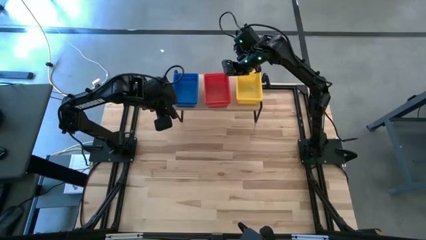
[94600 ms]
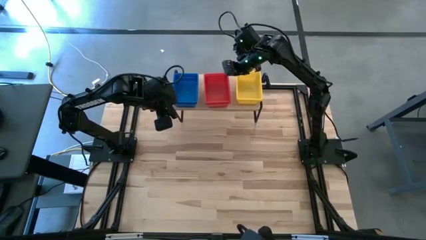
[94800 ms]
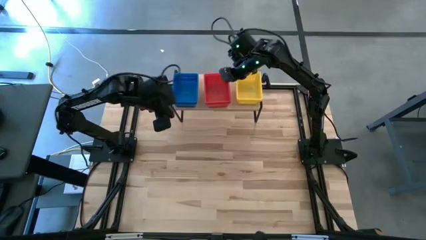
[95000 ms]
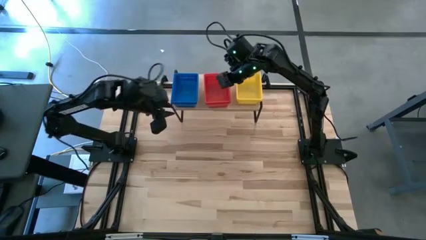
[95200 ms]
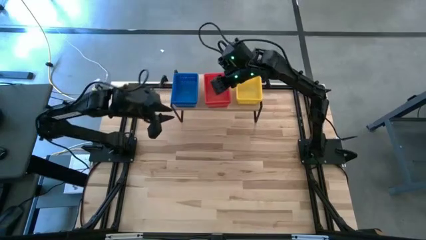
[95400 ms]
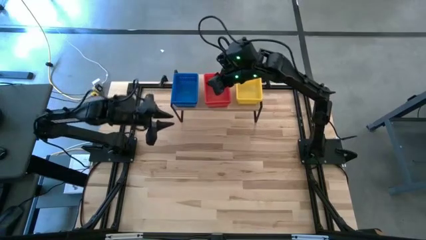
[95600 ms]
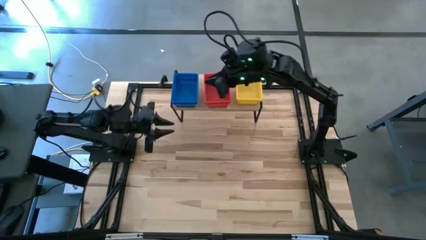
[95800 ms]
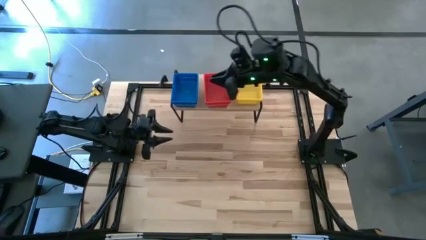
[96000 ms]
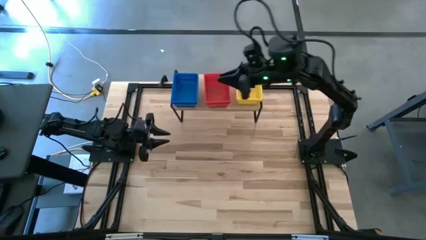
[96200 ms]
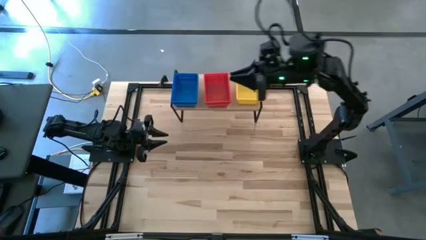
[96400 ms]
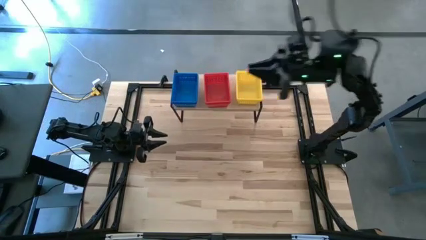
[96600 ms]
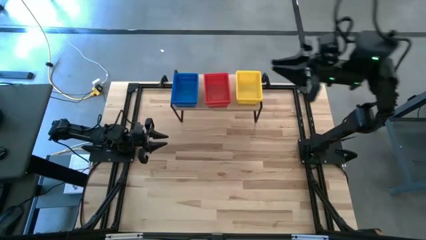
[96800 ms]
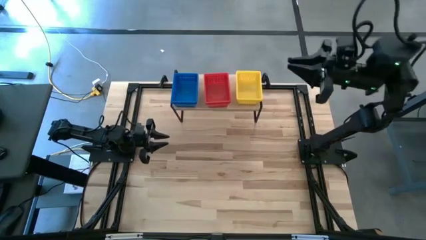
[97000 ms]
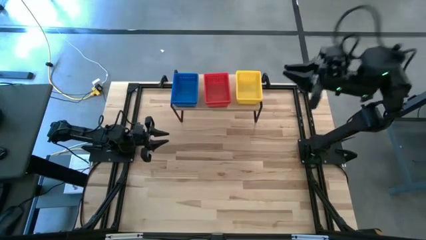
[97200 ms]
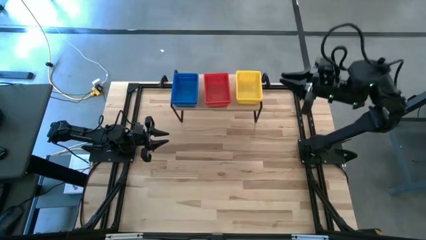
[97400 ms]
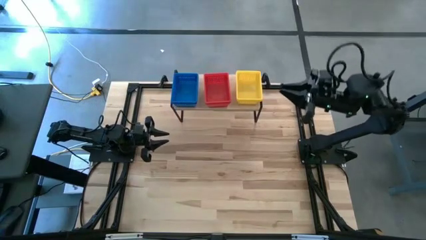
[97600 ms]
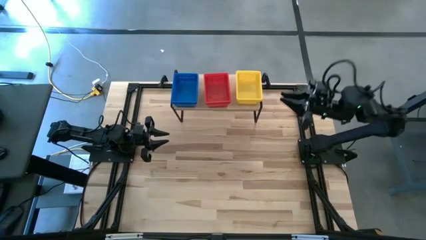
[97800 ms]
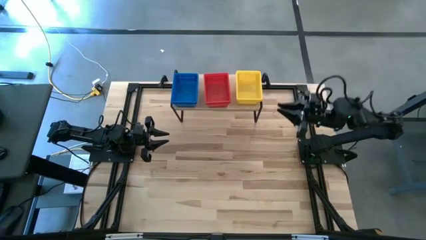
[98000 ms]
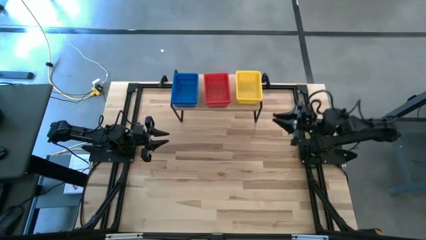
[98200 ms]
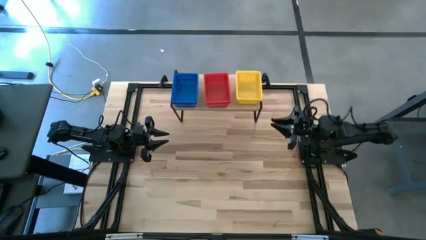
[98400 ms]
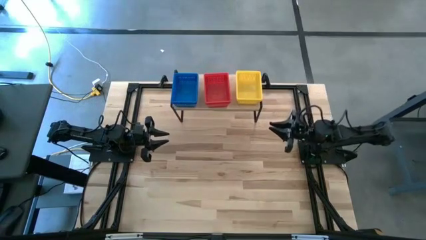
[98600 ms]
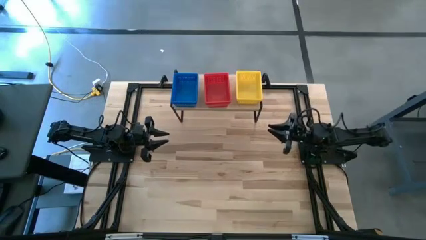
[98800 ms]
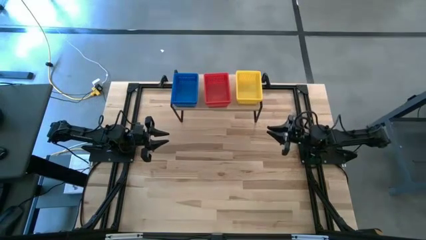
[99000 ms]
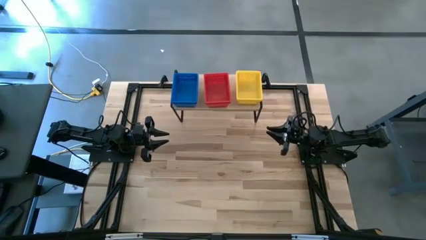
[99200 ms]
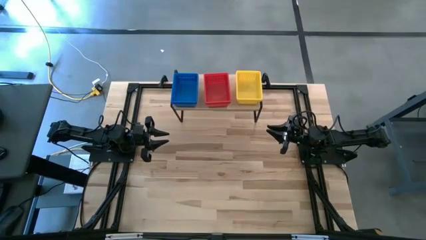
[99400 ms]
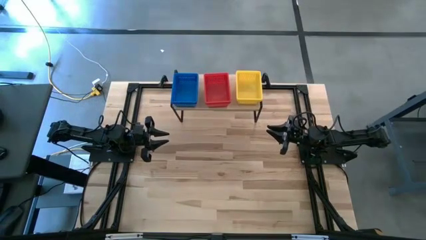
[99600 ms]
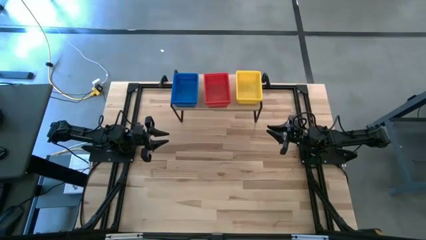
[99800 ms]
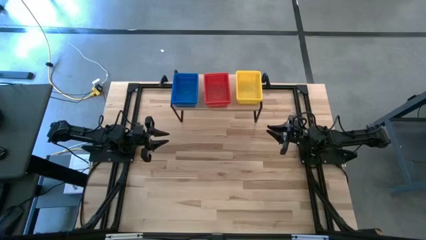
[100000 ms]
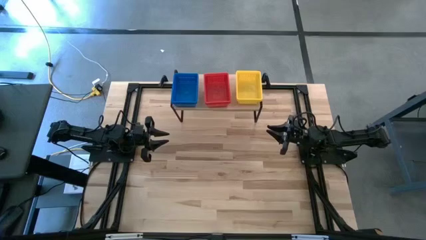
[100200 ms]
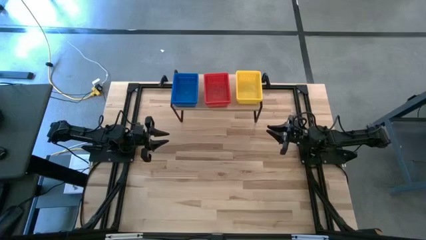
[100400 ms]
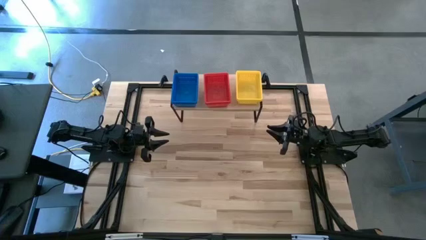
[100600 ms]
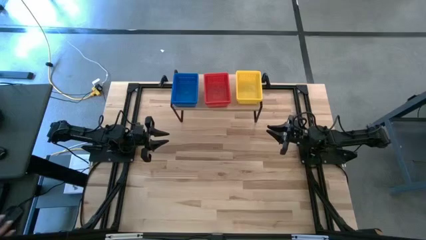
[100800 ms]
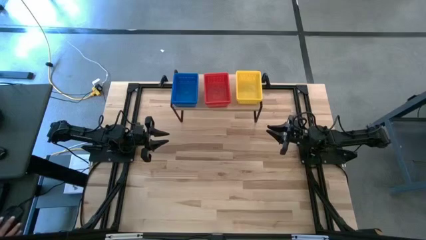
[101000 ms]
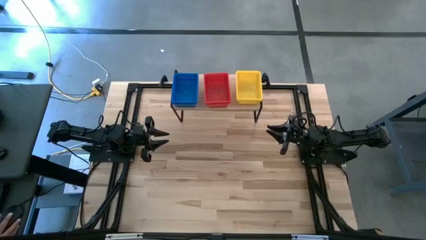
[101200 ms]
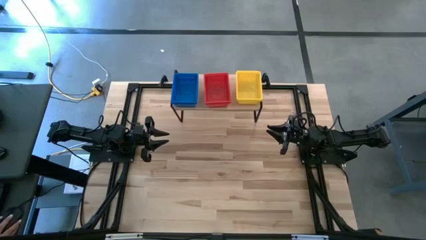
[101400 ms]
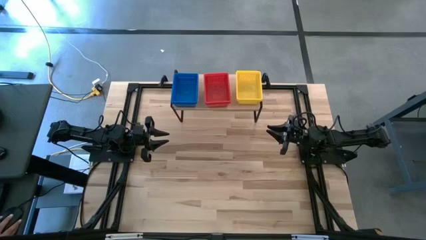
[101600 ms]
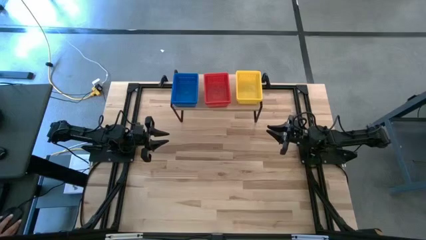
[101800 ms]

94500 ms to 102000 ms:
Task: Stack baskets on shelf by color
Return to Home Position

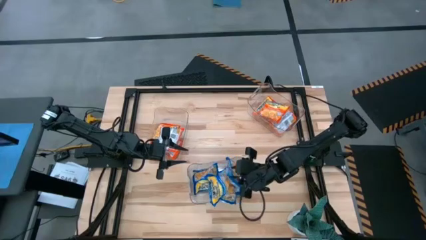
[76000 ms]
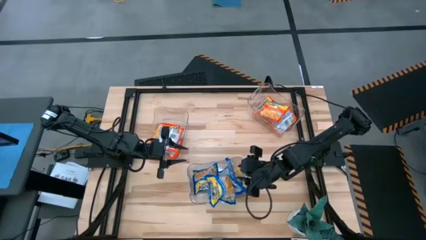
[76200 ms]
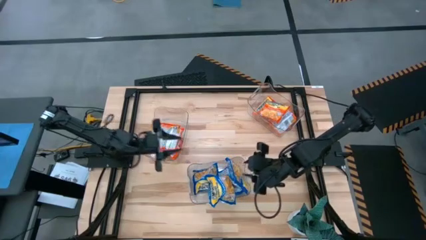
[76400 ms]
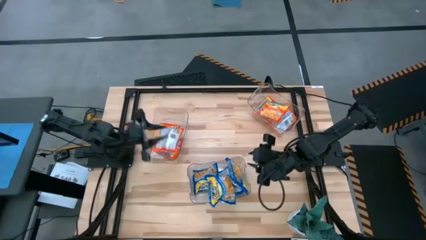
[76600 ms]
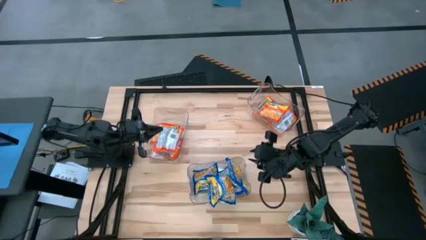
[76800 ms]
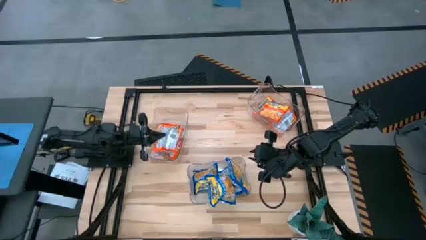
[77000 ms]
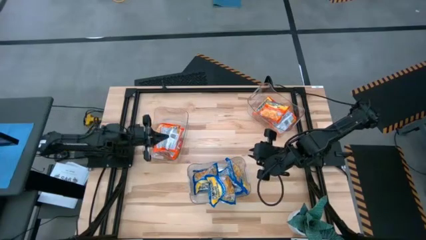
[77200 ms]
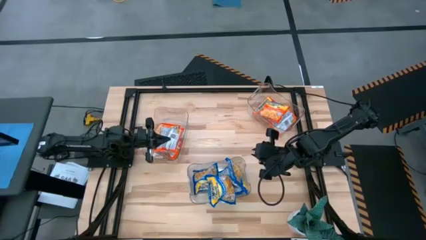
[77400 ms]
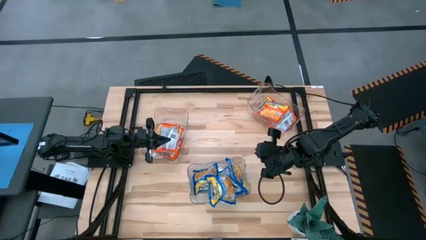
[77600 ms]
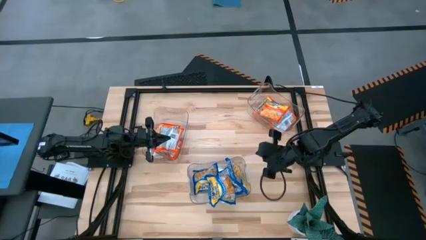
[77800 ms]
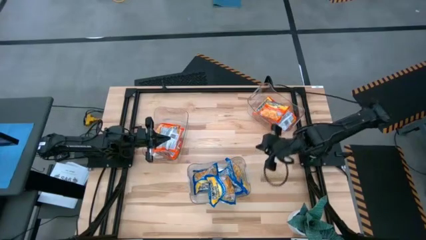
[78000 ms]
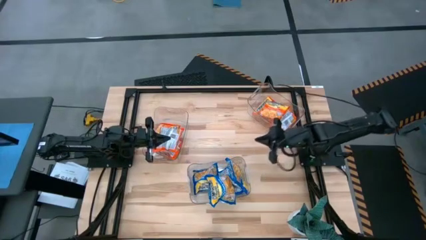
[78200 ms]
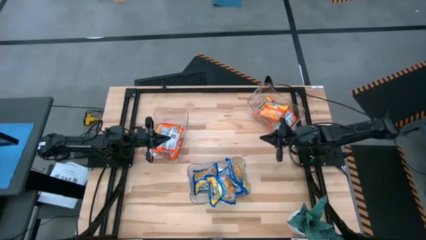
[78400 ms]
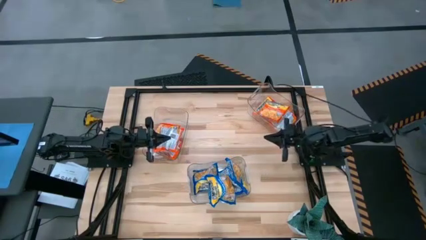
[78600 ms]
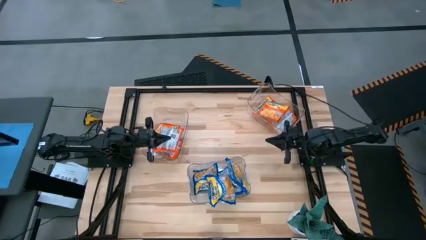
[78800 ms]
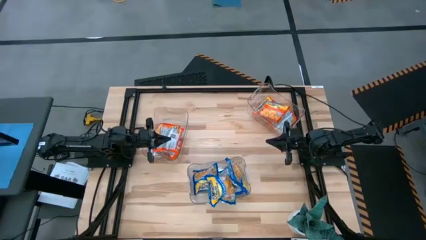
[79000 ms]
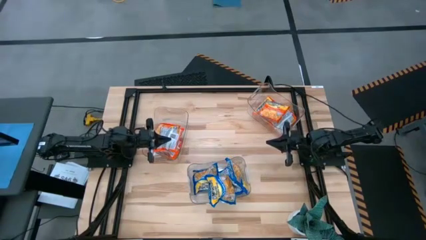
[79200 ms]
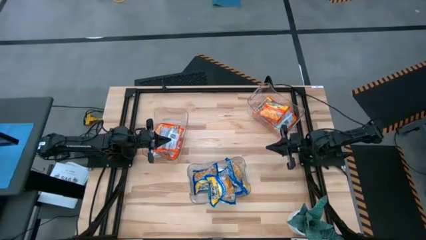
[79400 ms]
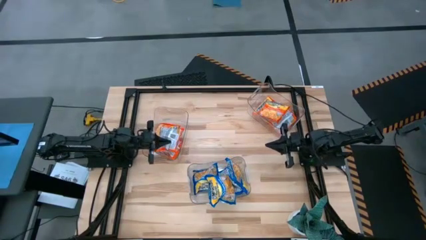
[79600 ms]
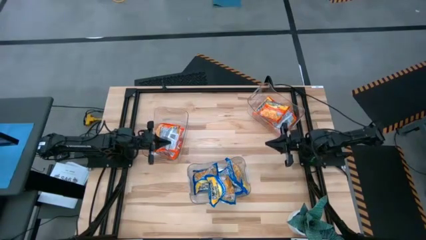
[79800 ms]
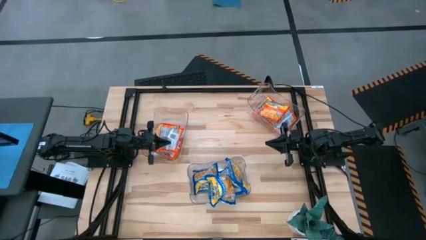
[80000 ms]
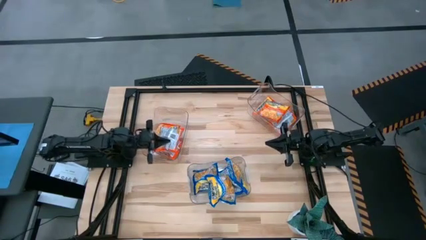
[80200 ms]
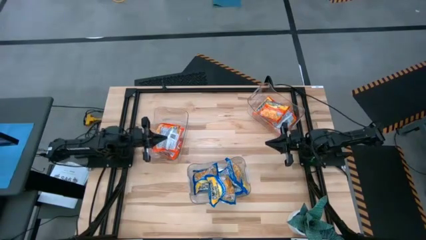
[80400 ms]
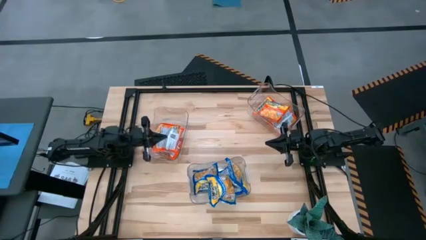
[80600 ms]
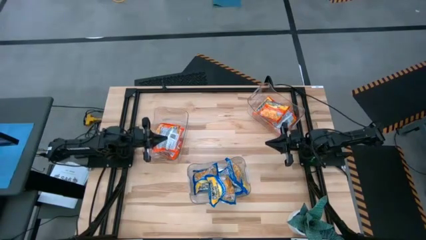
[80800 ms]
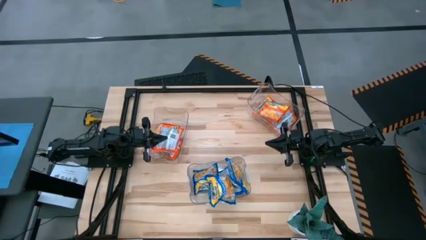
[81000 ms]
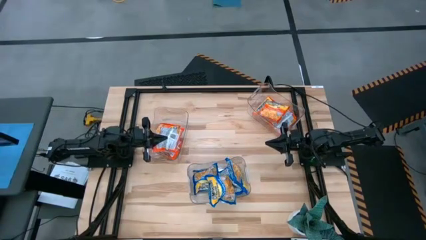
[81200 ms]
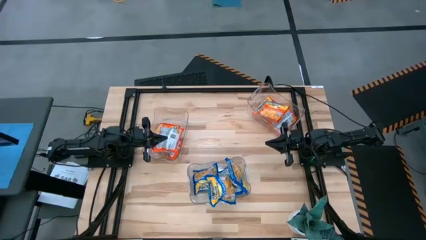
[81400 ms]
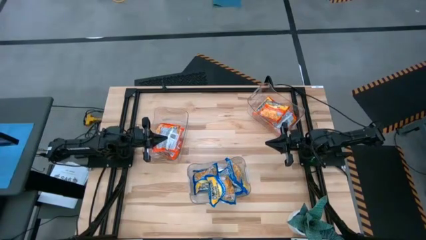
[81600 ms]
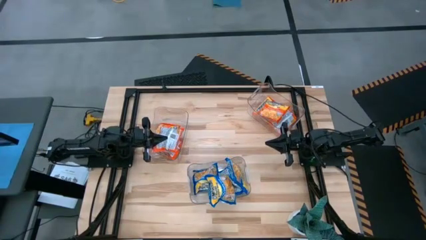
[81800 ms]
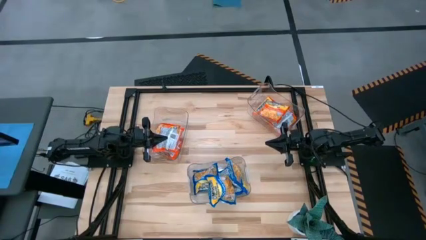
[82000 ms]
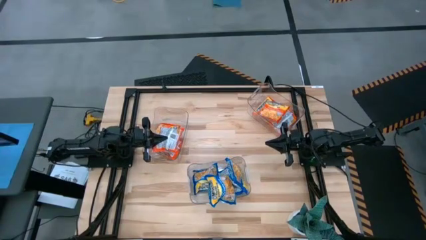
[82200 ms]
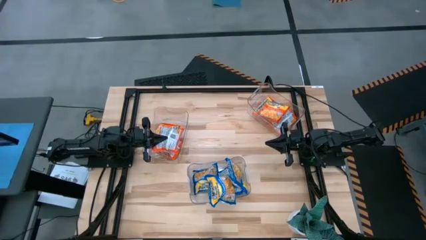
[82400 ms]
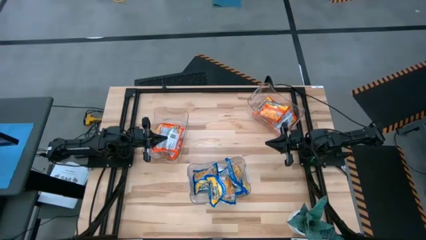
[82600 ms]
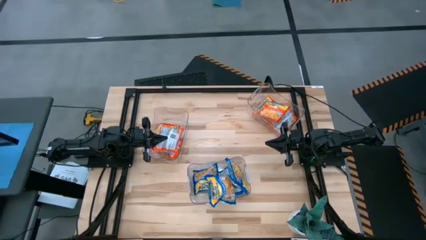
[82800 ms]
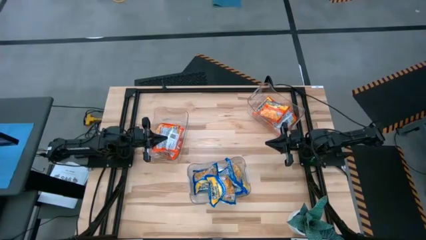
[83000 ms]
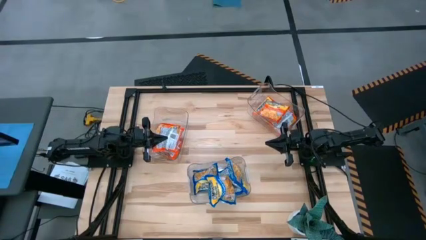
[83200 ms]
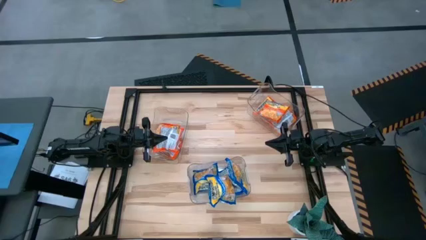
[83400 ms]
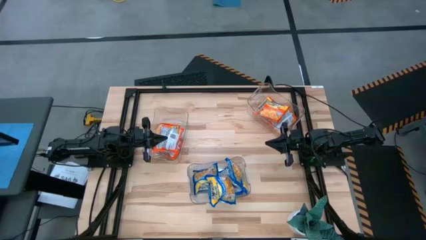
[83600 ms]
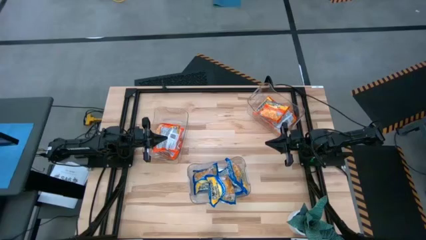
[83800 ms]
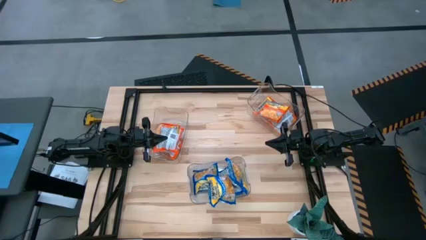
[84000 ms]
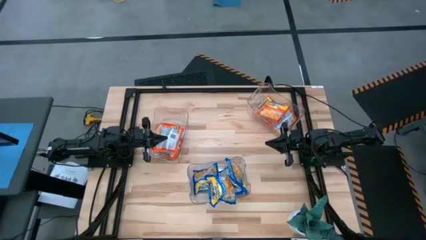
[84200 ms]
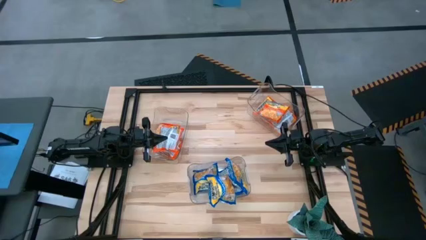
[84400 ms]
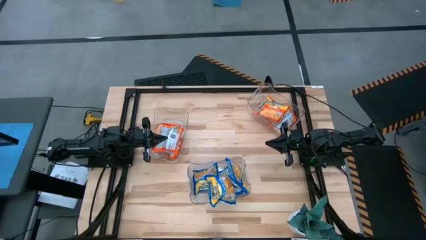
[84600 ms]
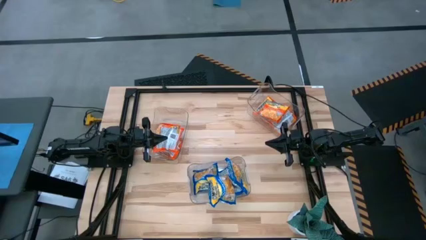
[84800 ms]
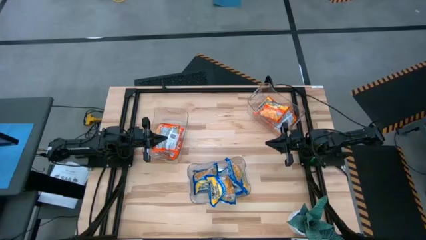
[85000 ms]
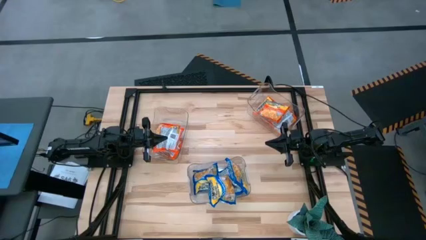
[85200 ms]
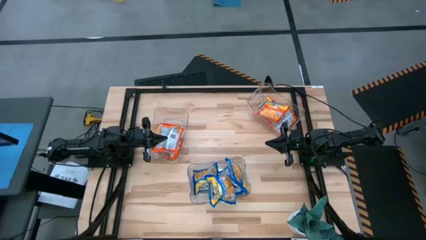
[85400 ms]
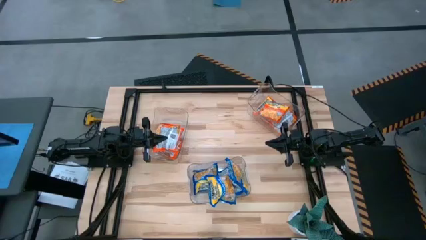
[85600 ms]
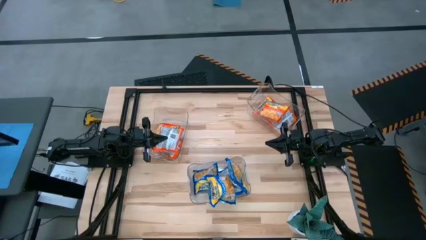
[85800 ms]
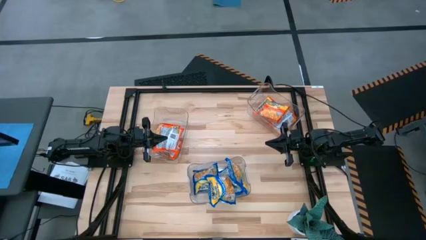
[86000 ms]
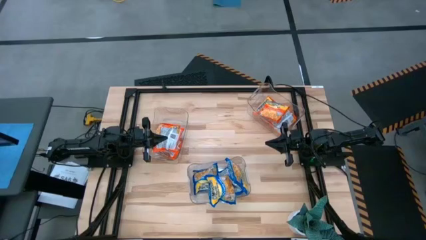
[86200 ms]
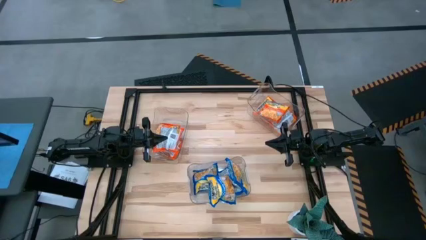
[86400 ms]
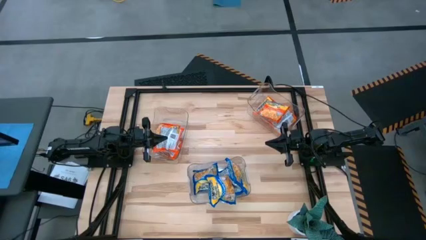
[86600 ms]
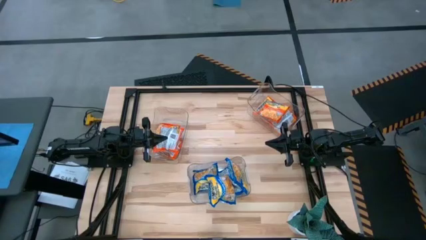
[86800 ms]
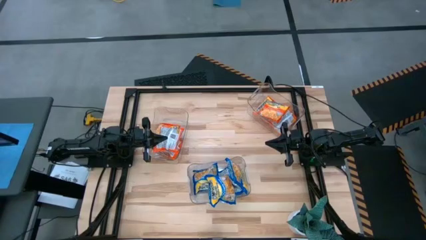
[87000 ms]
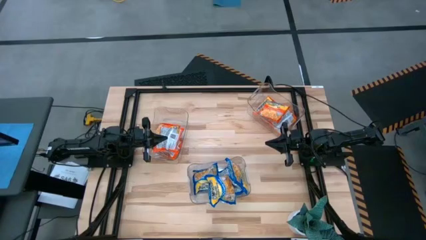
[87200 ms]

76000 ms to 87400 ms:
Task: Sort Maruchan noodles
Return to Home Position
